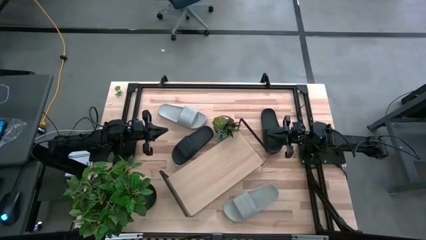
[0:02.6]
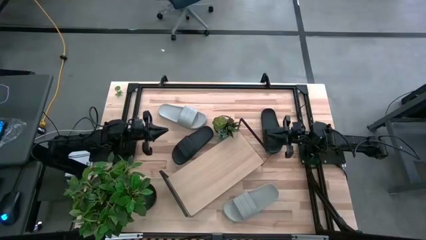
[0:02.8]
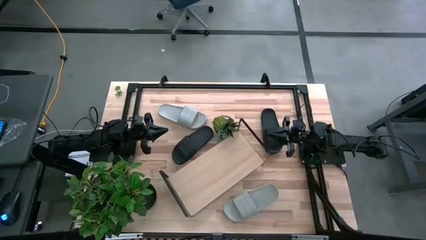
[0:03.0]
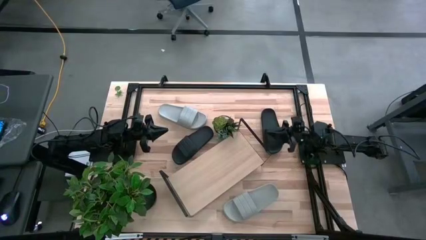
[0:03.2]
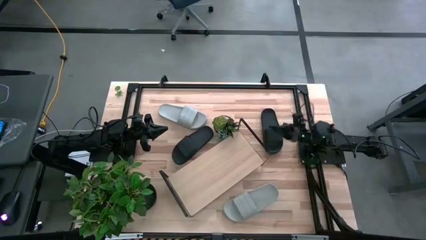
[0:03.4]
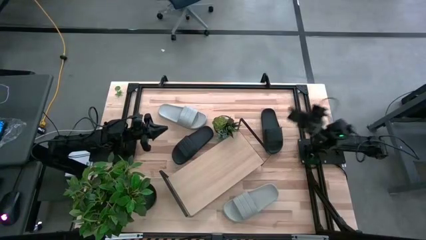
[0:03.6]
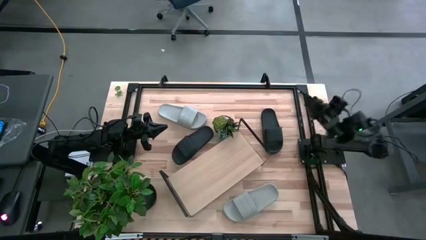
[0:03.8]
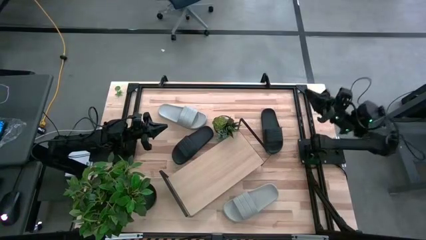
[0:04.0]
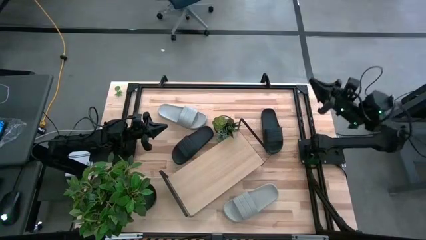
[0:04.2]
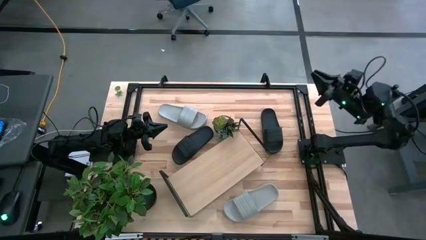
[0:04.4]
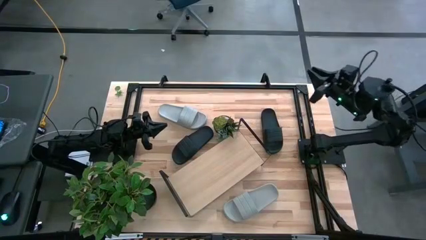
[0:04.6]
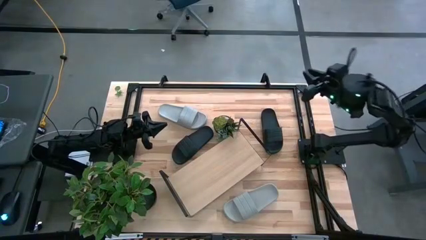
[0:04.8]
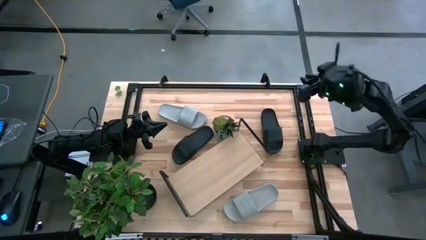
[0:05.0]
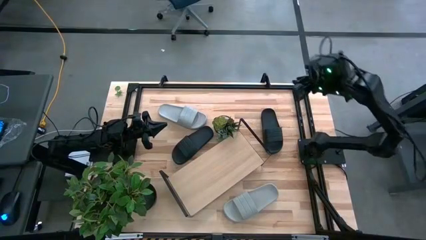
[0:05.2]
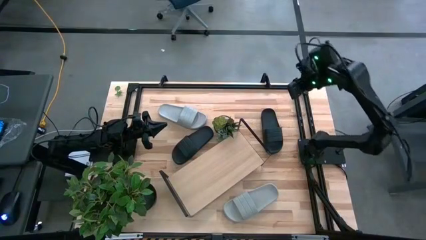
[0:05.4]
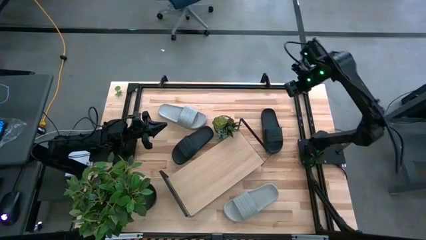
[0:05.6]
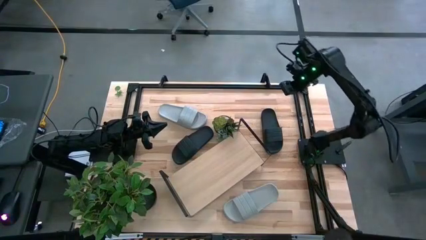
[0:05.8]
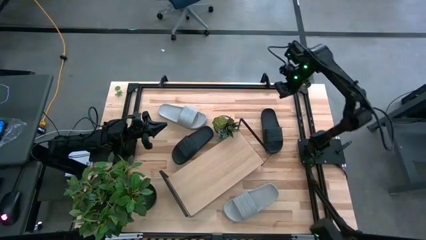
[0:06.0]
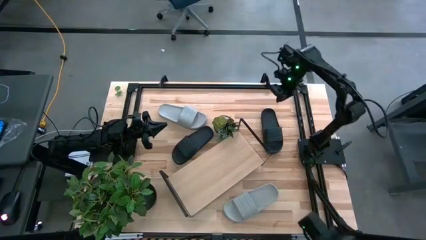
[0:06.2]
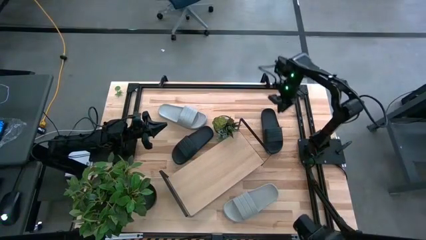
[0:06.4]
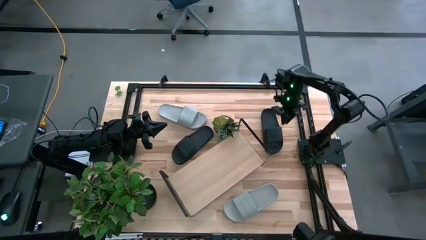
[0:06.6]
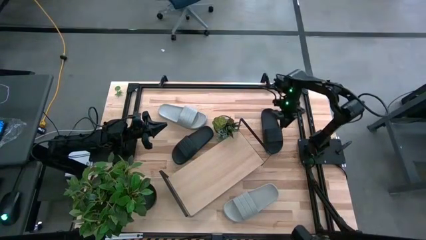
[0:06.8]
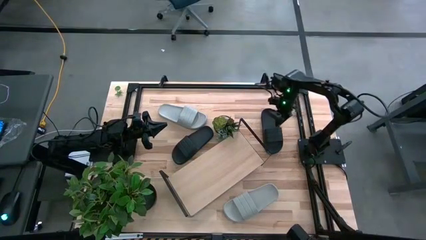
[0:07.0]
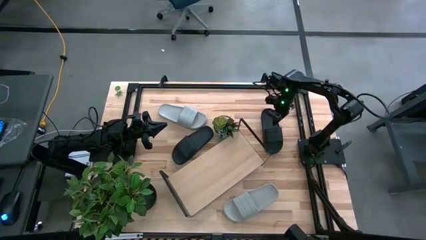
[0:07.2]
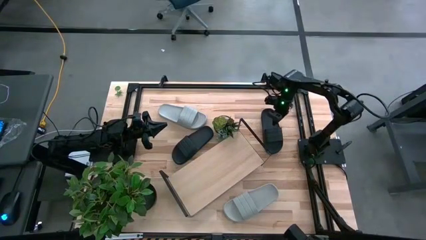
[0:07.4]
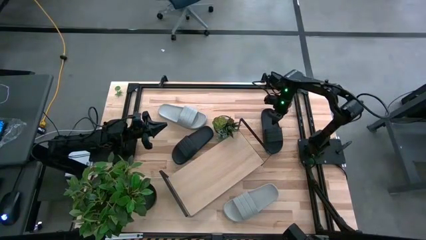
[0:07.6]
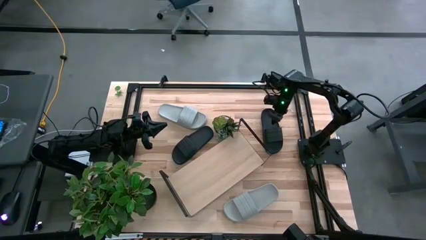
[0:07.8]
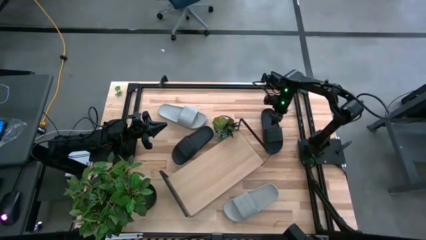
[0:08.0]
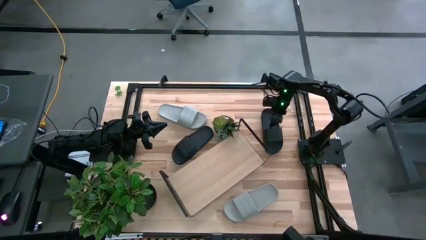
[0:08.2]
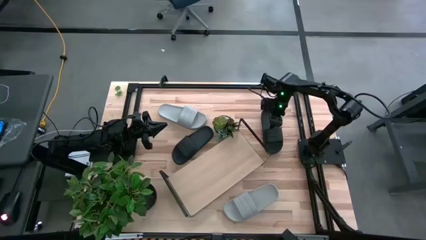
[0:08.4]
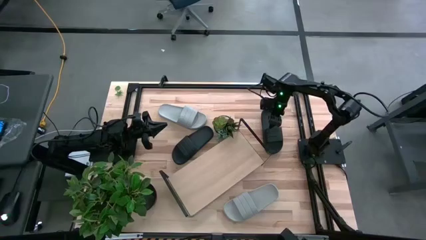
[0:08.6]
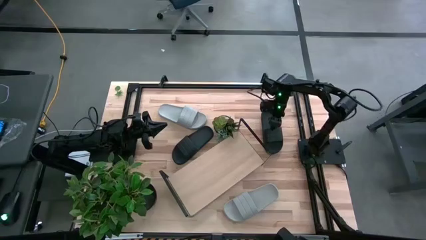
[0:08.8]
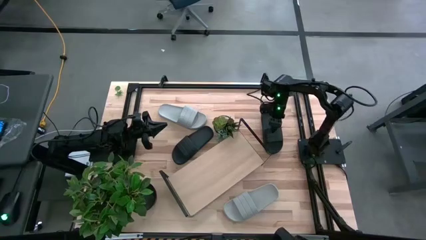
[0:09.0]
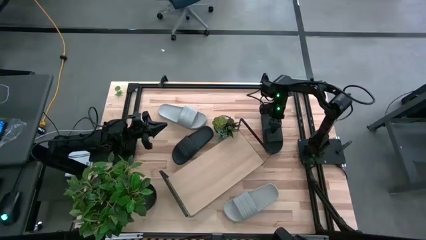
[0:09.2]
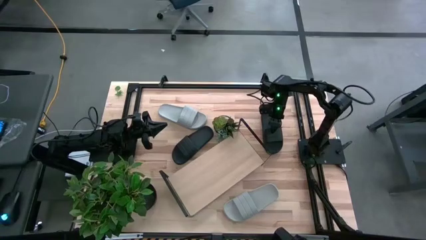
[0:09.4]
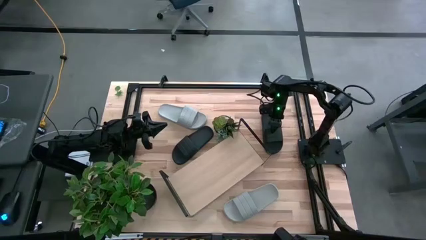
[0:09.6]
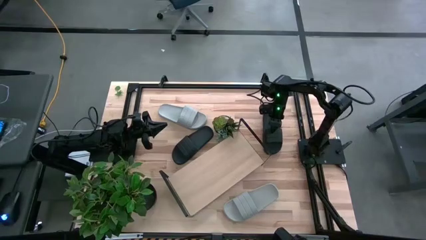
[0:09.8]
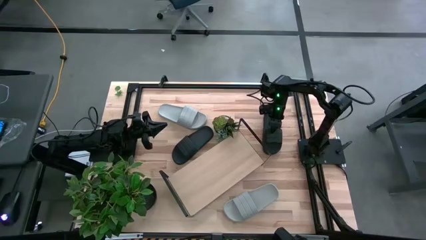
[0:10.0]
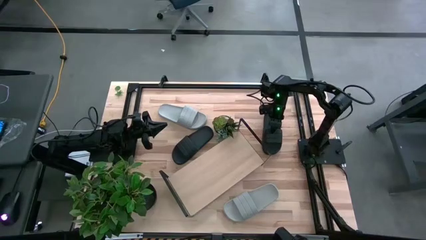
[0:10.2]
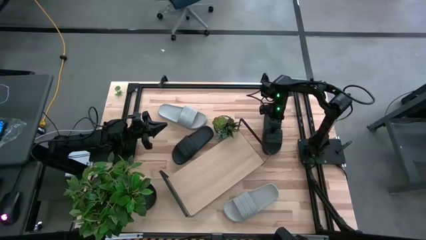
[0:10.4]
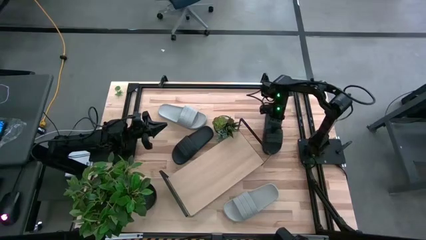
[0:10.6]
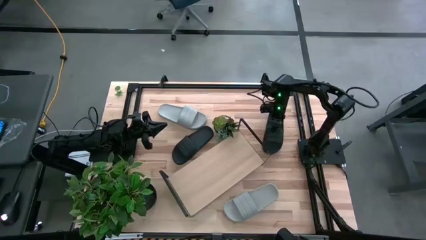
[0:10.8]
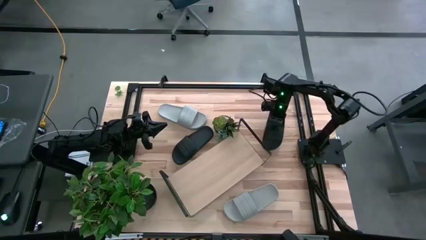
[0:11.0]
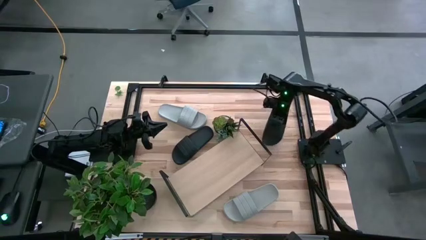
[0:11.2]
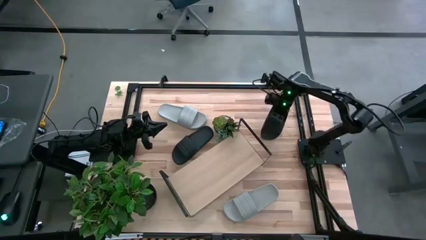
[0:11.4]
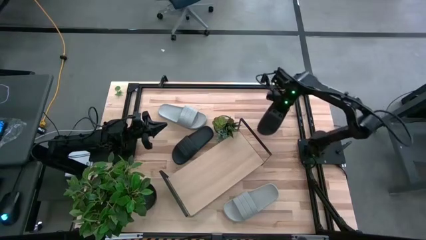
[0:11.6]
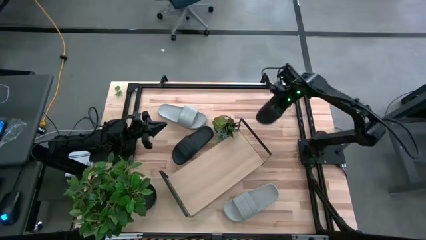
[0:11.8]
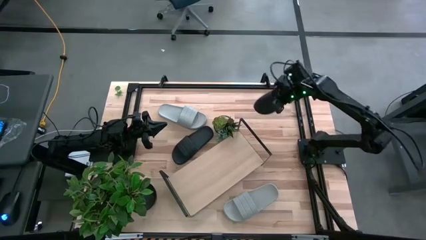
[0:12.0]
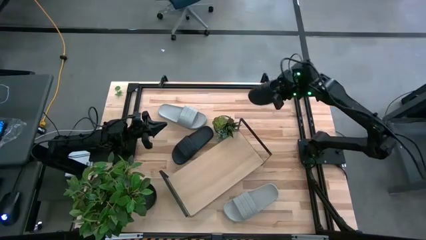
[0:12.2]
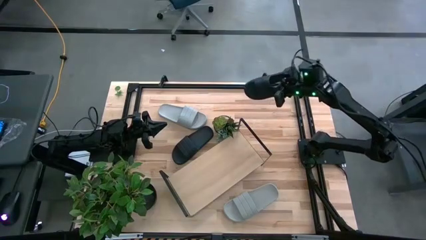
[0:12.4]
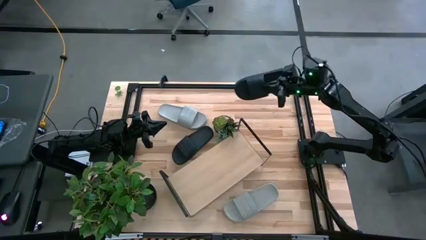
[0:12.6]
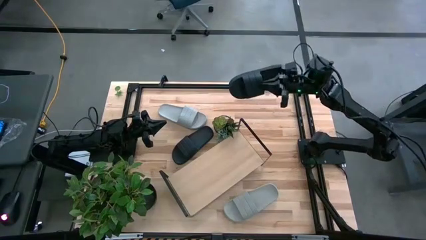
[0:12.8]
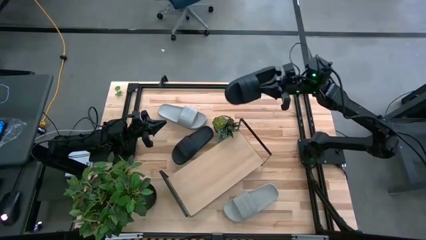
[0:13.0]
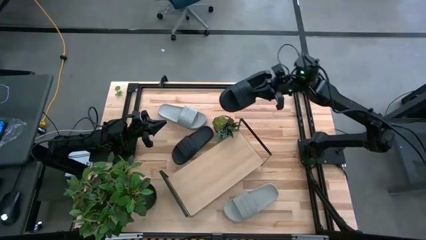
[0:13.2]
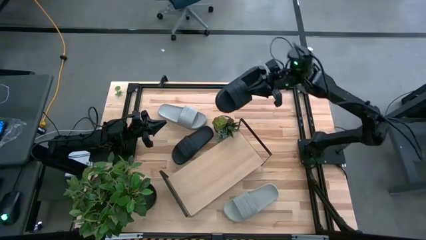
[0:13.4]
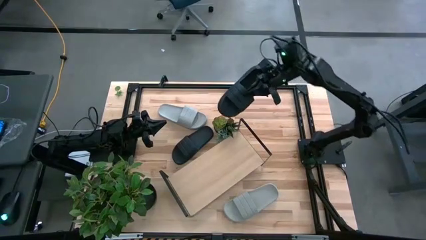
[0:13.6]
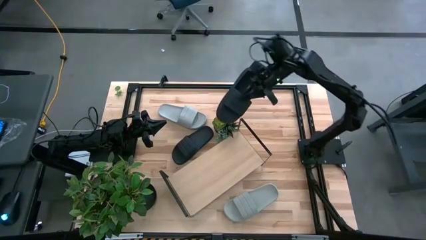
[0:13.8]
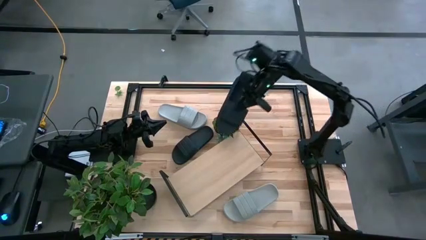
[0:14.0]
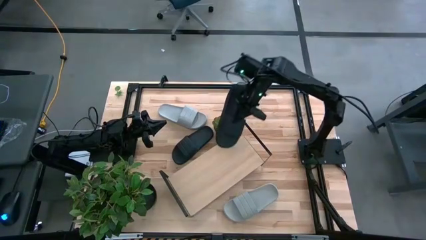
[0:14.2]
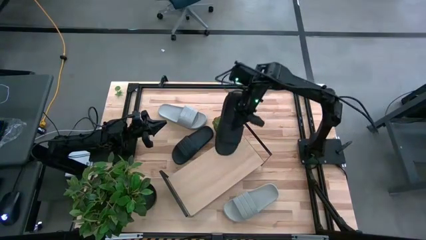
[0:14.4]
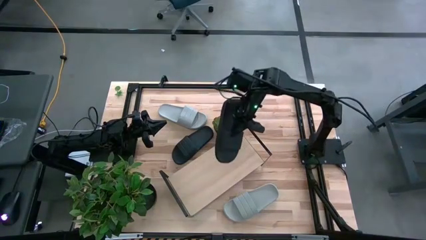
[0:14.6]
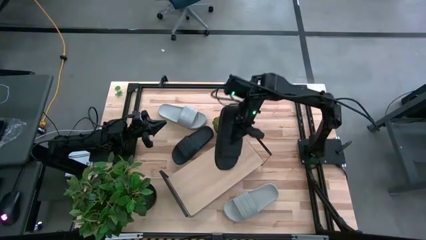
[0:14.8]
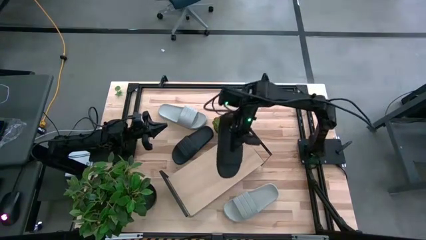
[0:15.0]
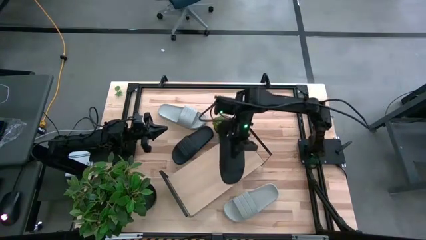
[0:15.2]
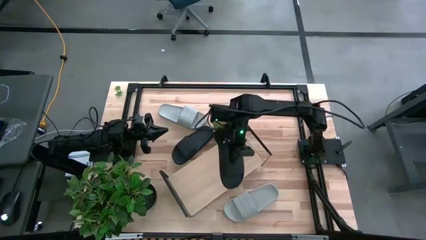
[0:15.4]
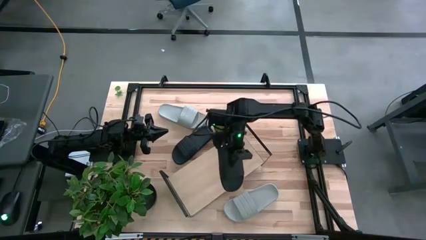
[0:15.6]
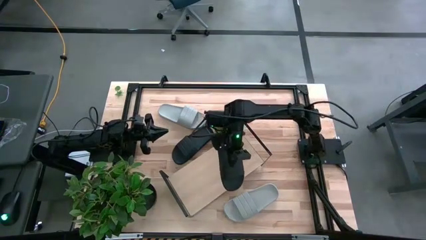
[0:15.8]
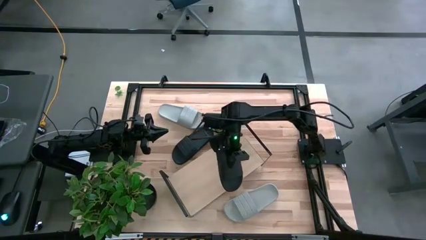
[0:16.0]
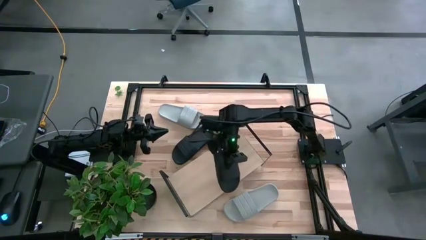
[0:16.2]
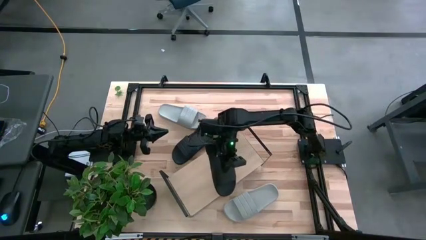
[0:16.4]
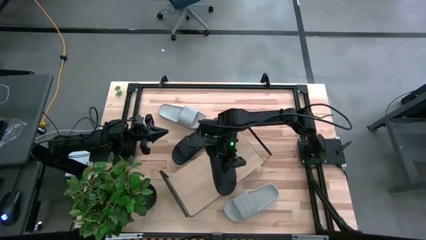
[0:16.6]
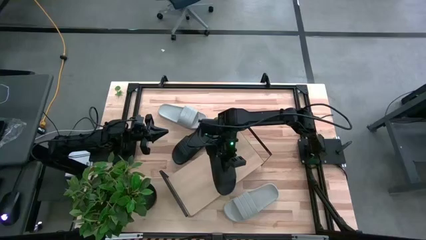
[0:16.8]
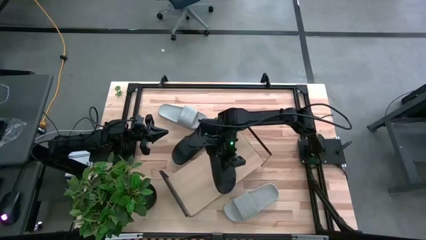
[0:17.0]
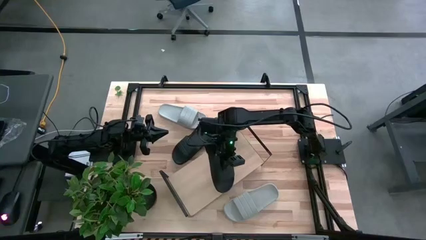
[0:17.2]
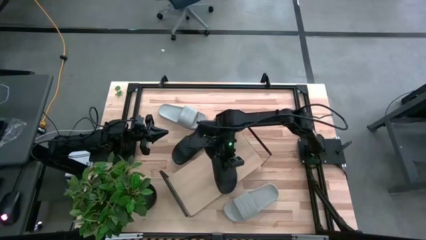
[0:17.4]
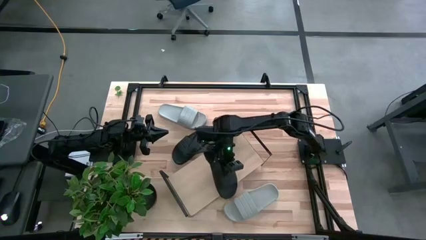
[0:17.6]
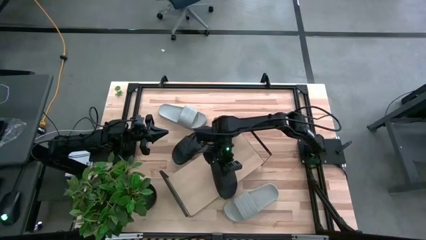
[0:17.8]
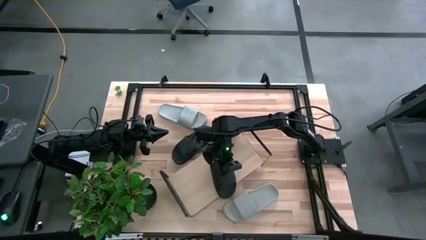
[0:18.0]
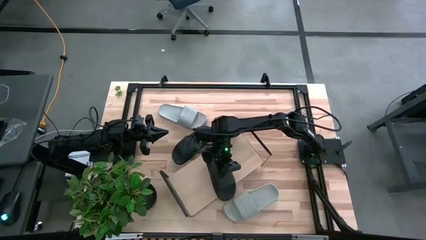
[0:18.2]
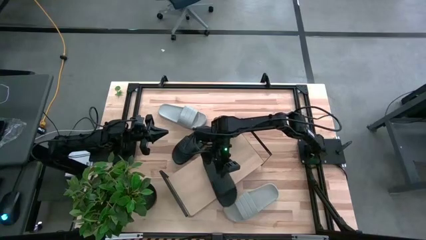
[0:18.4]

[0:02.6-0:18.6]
Task: Pick and place slides into the shelf
Put the right black slipper on the shelf
